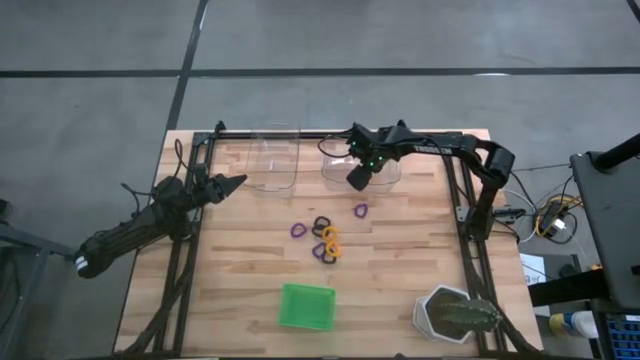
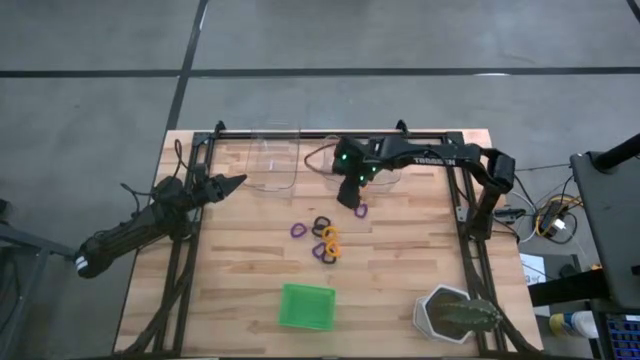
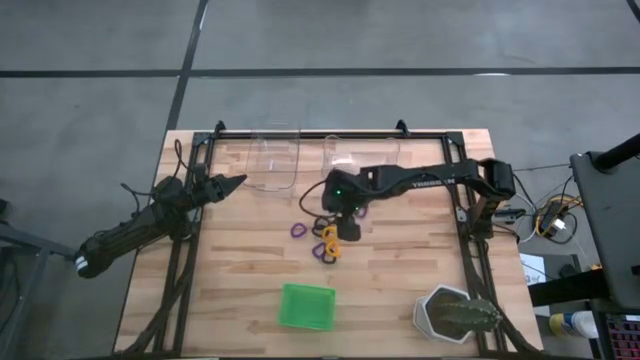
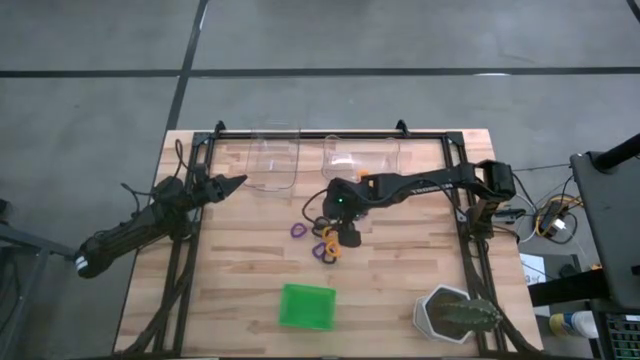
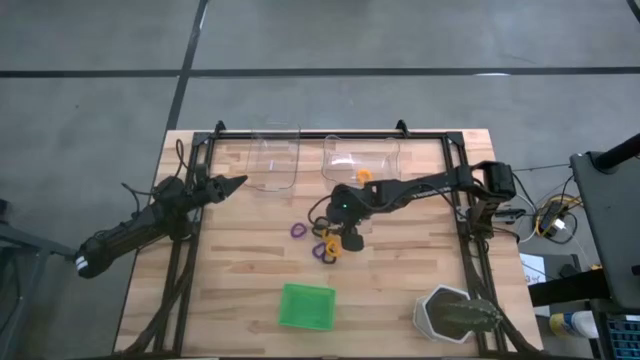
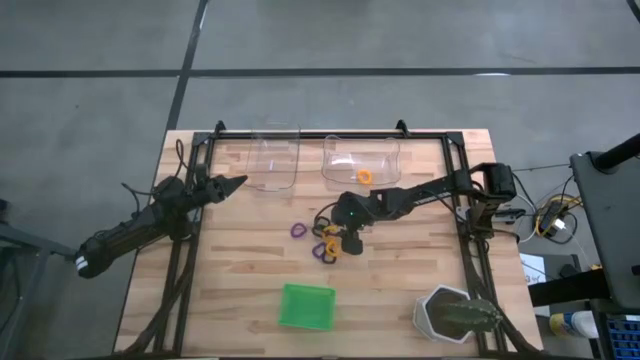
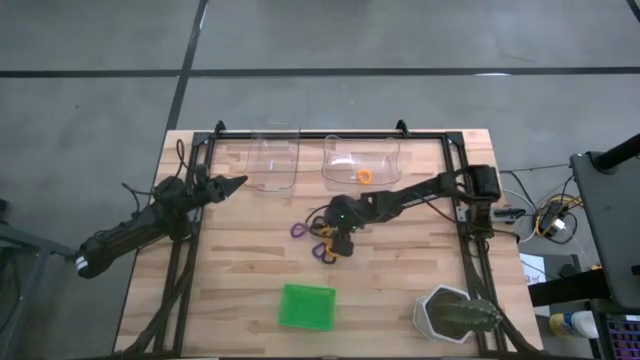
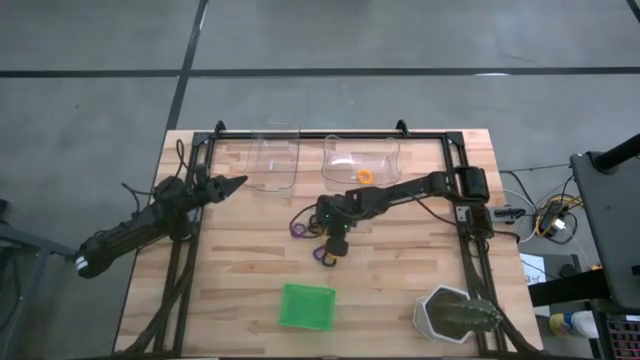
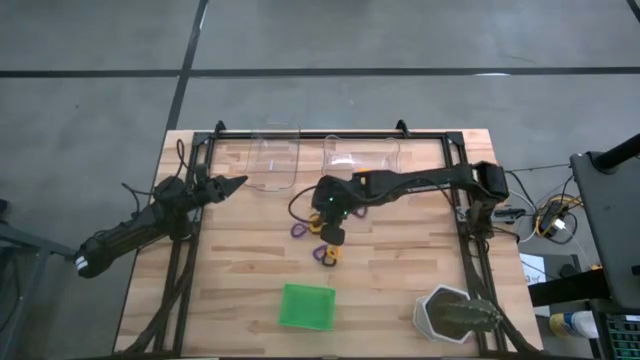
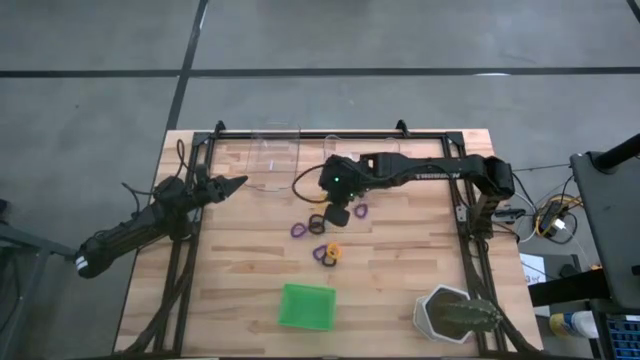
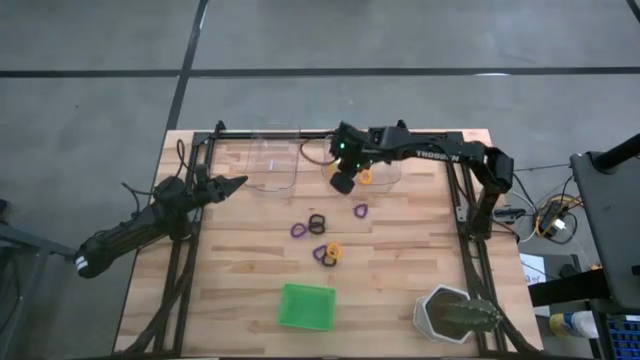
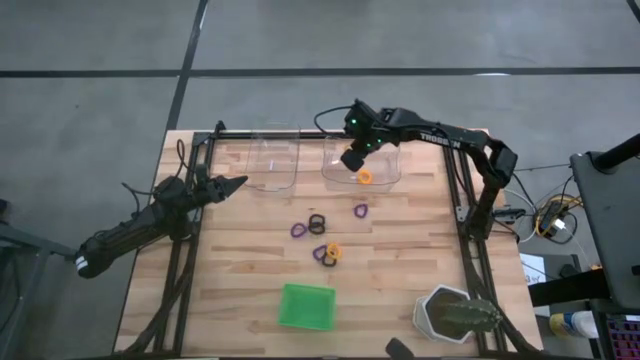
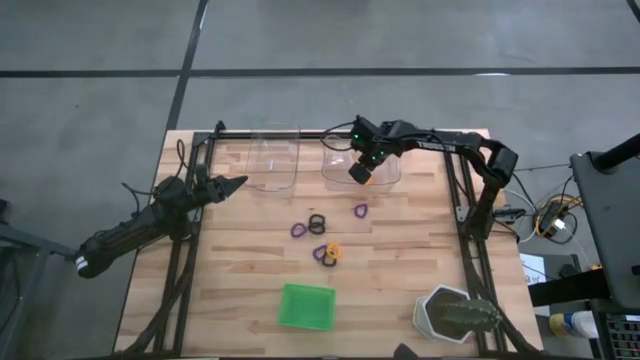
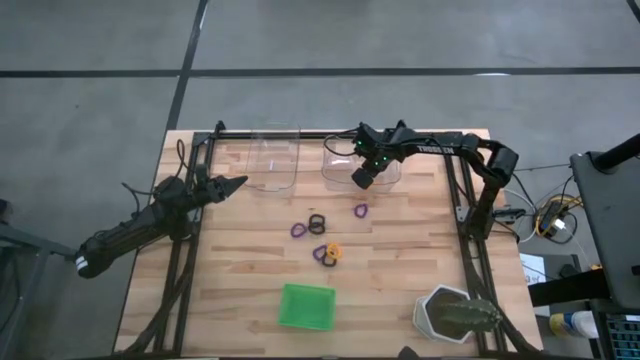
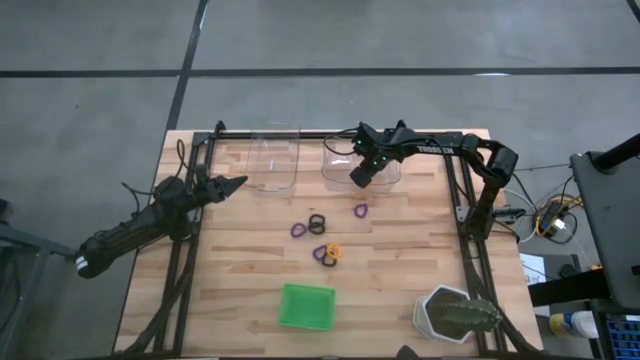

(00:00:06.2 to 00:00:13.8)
Task: Sort spring keychains
Put the top yellow spring keychain into the right transparent bin

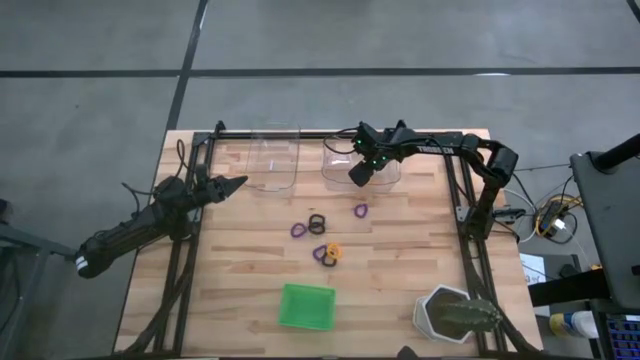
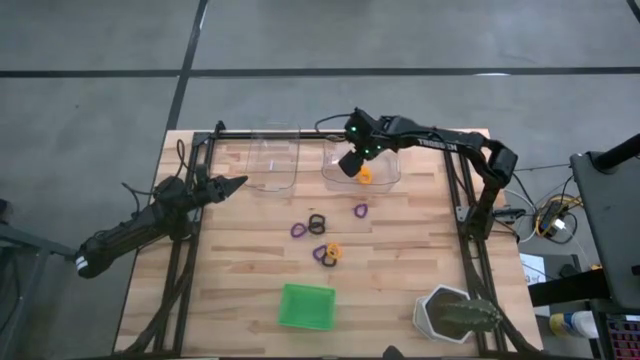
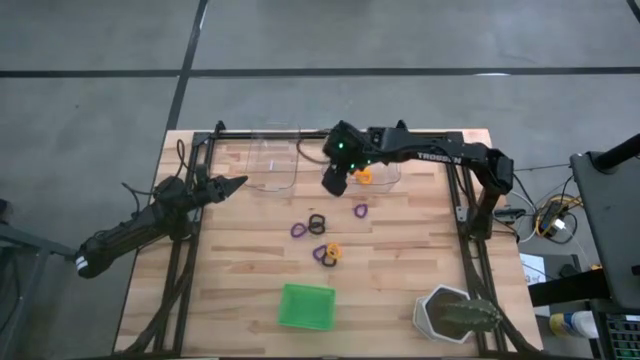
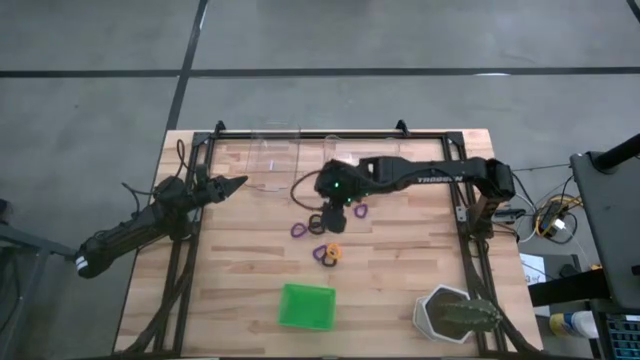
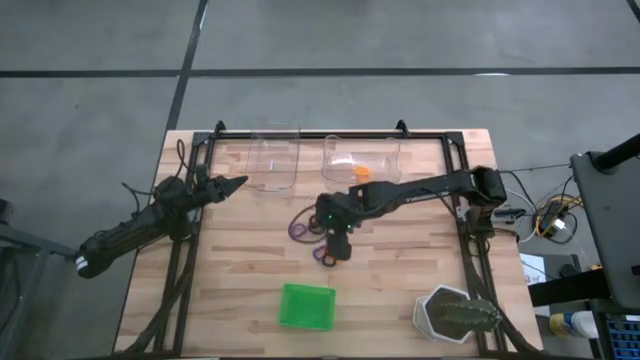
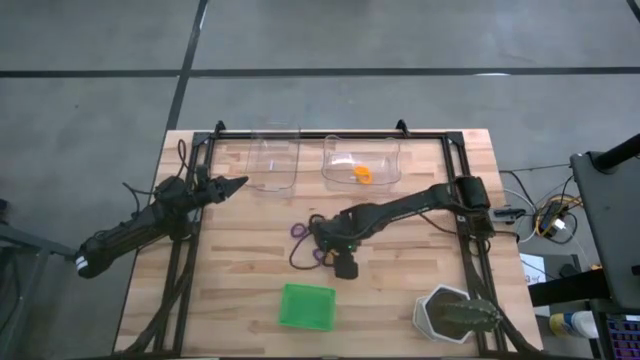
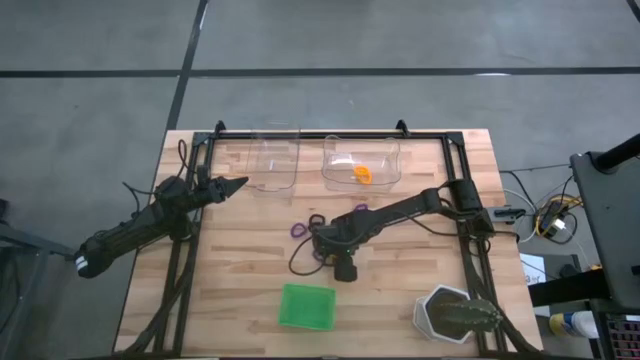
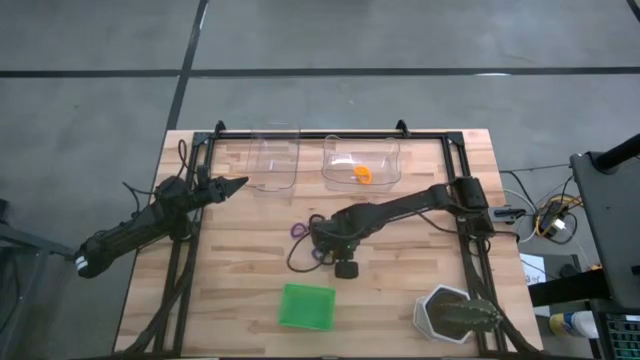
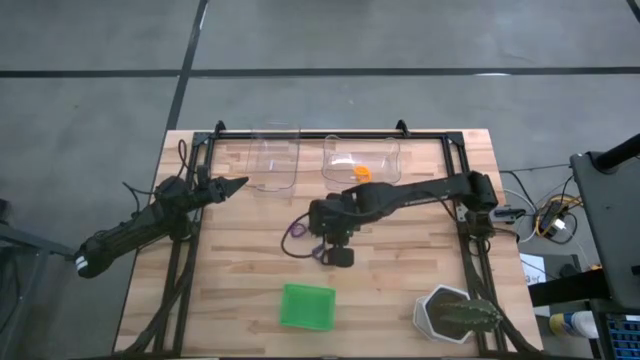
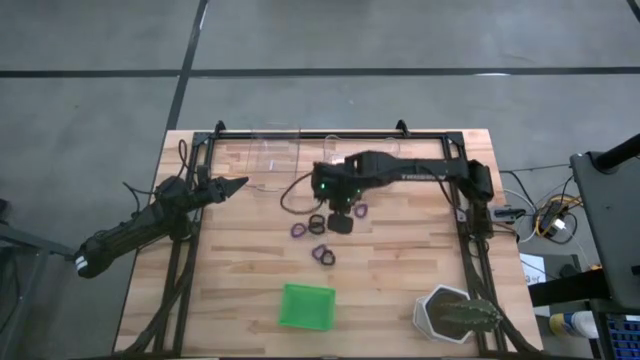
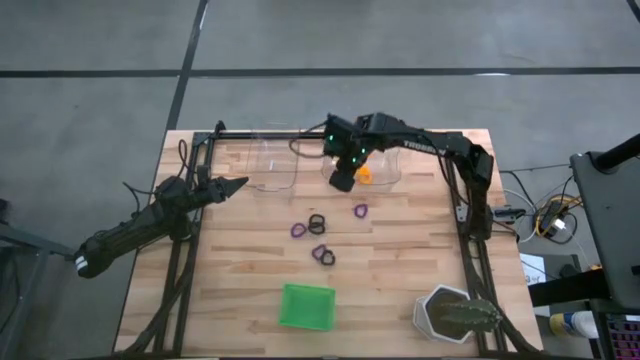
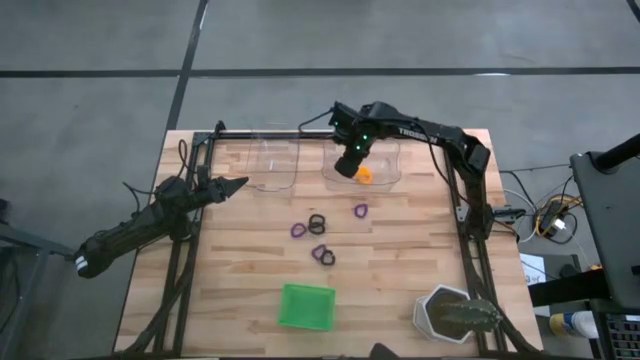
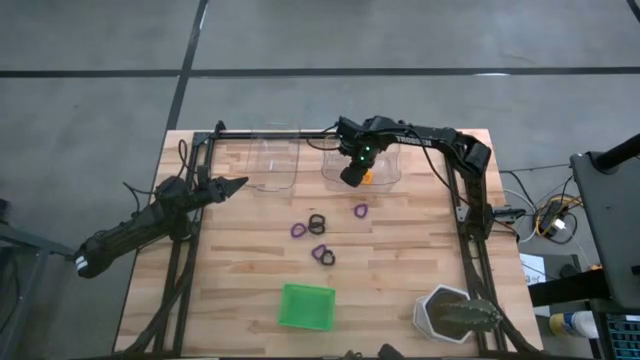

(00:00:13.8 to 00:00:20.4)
Put the yellow spring keychain into the right transparent bin

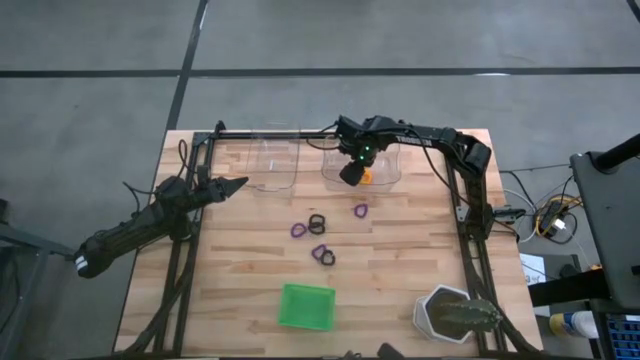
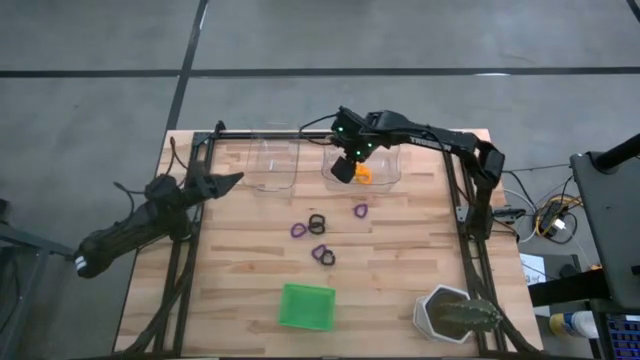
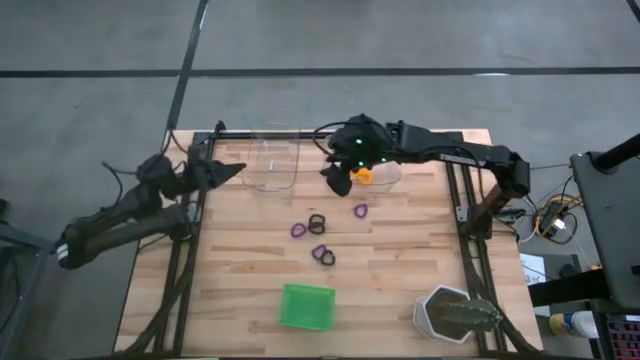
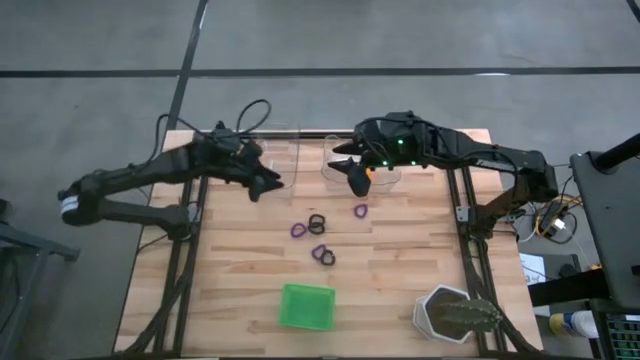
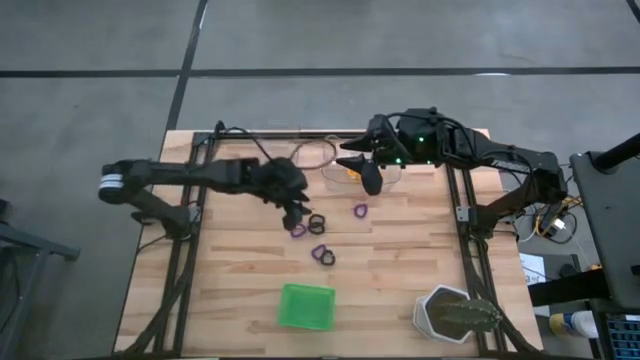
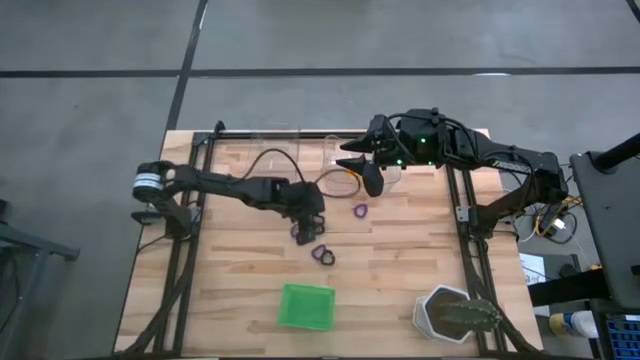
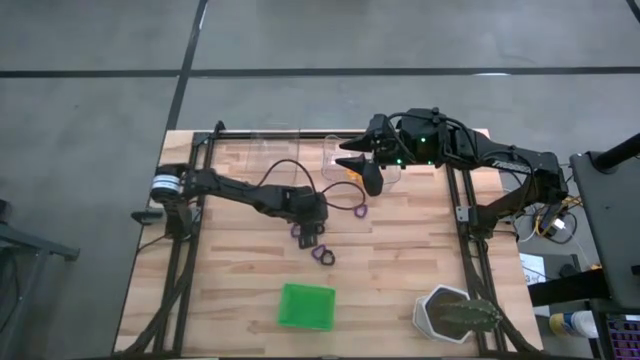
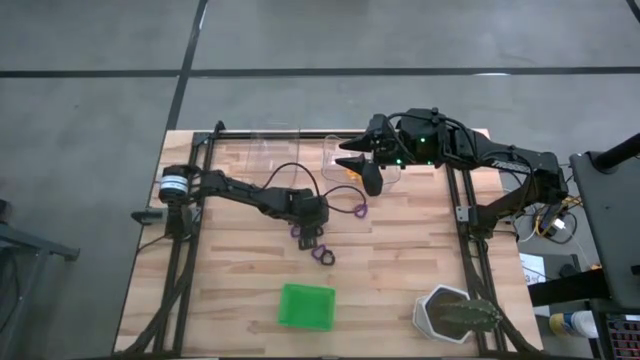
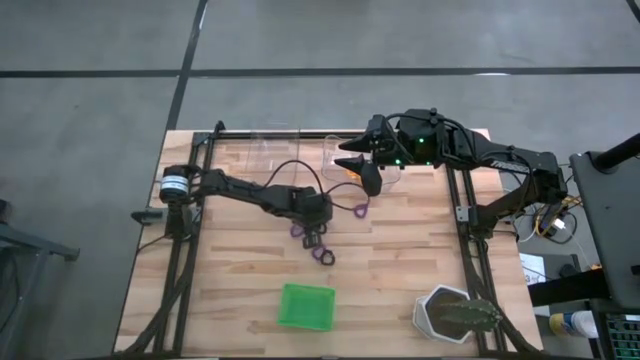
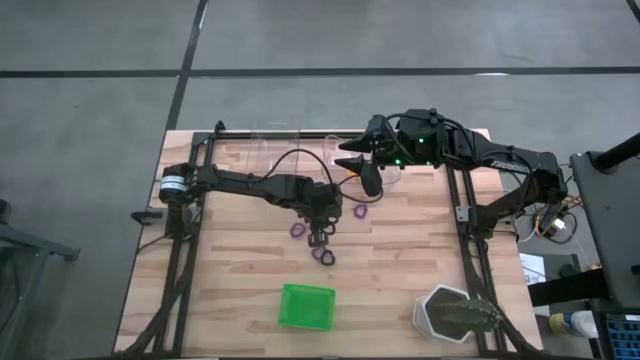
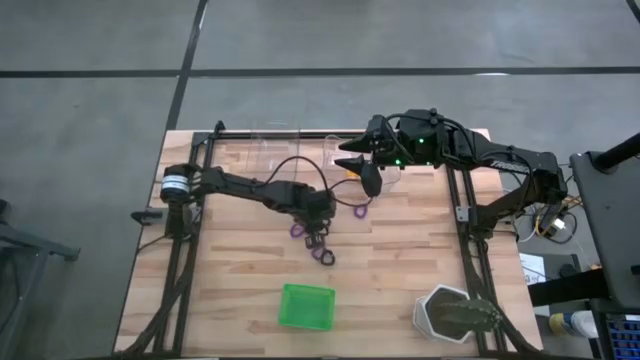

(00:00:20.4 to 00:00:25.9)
Put the middle black spring keychain into the left transparent bin

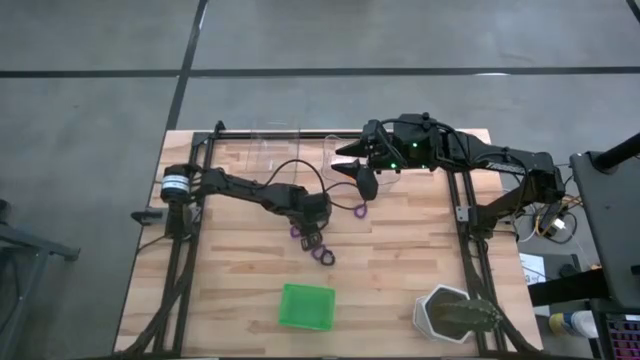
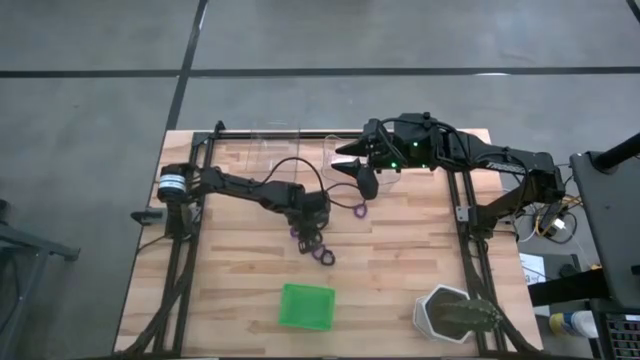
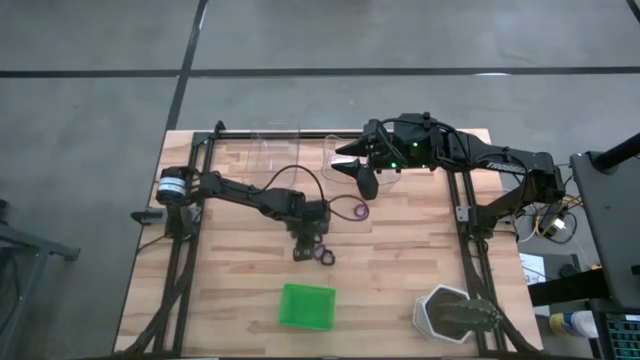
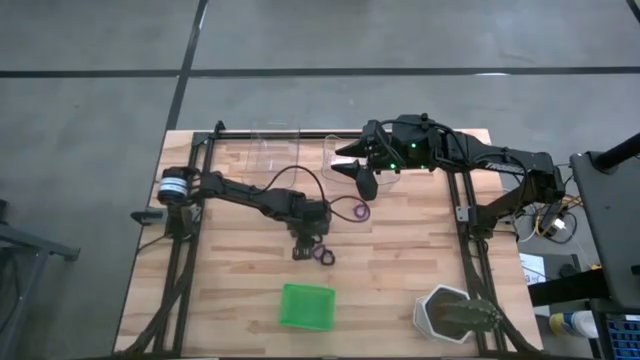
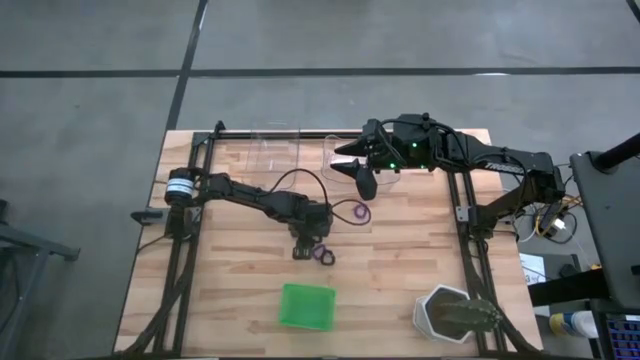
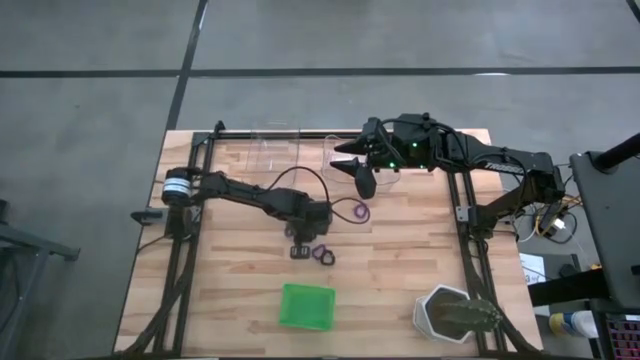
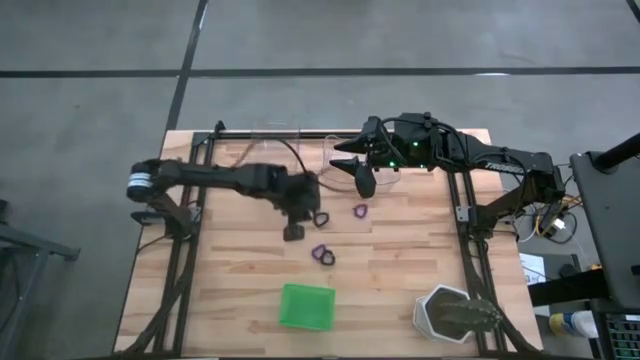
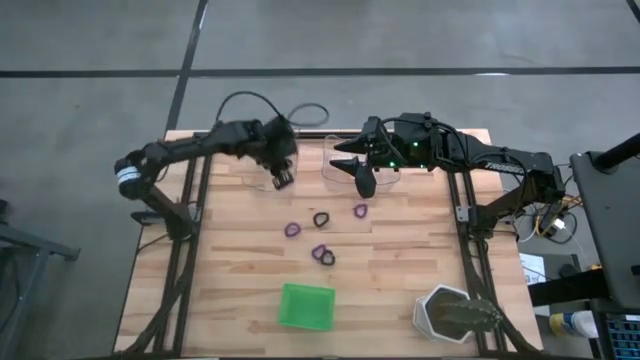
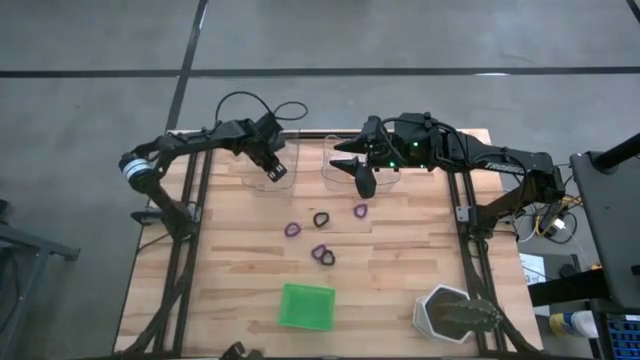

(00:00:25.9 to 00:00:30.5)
Put the middle black spring keychain into the left transparent bin
